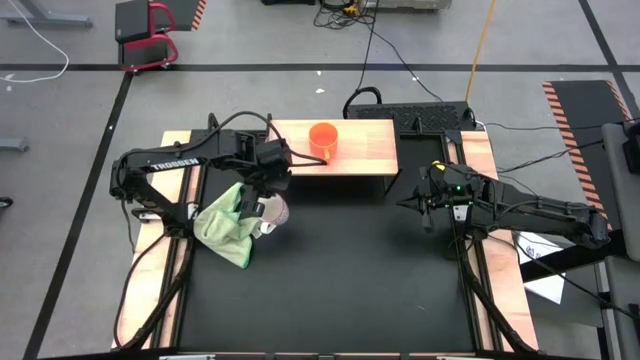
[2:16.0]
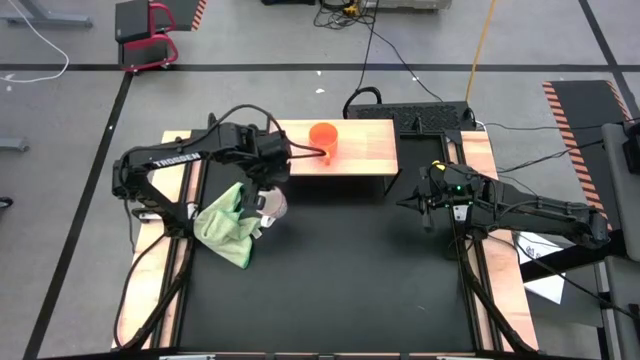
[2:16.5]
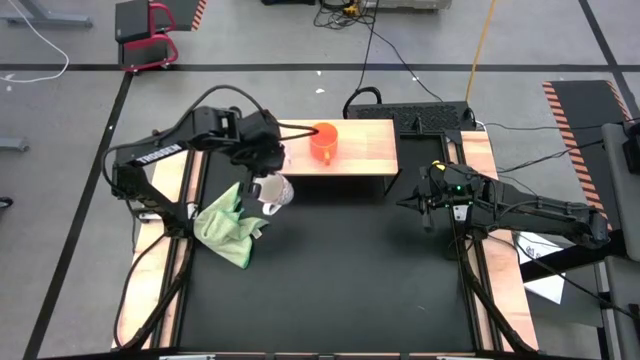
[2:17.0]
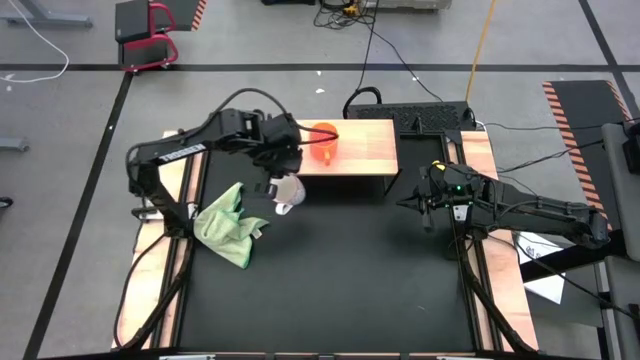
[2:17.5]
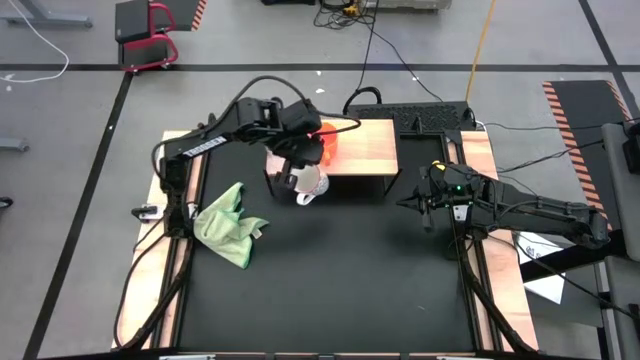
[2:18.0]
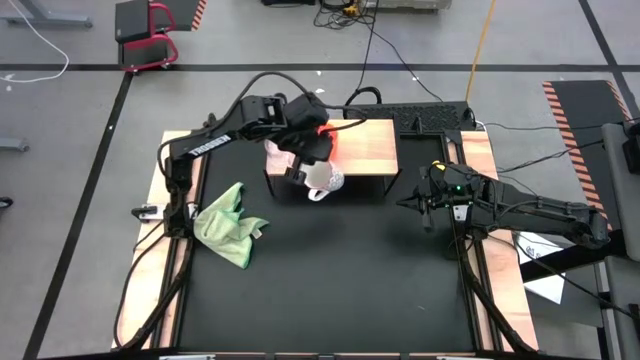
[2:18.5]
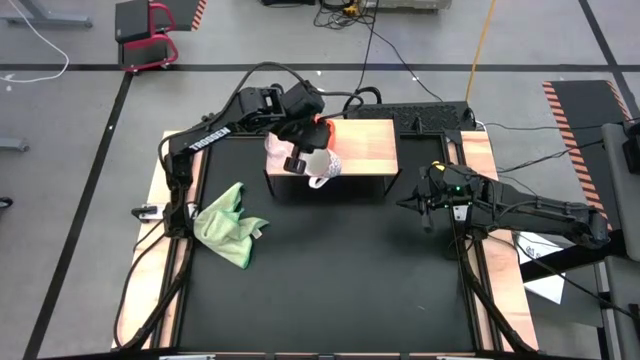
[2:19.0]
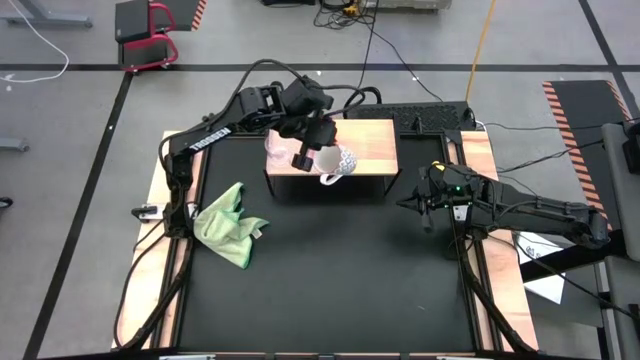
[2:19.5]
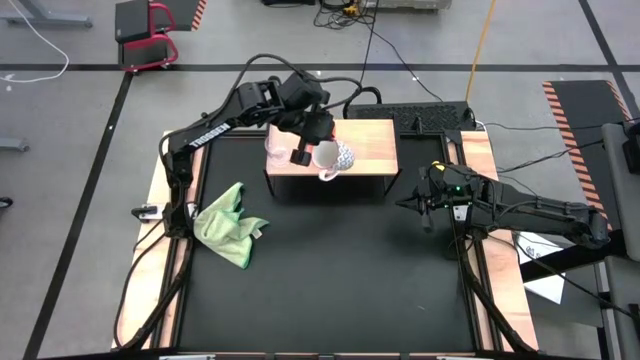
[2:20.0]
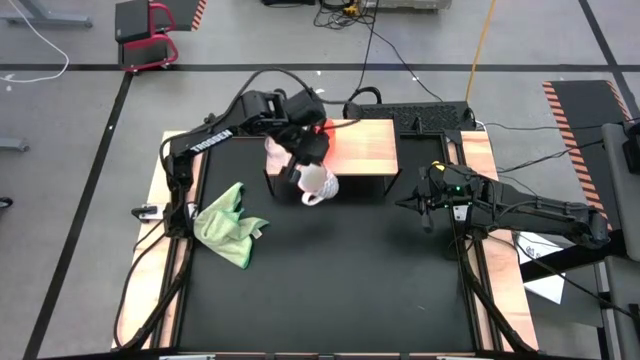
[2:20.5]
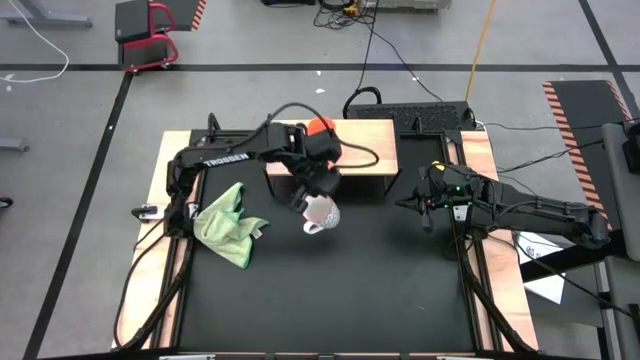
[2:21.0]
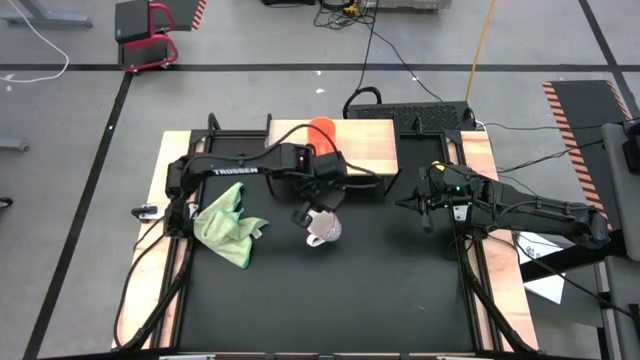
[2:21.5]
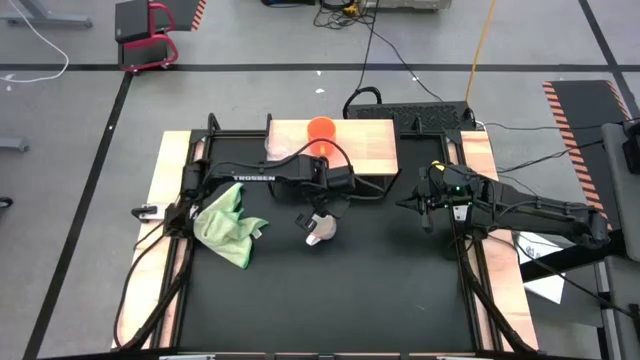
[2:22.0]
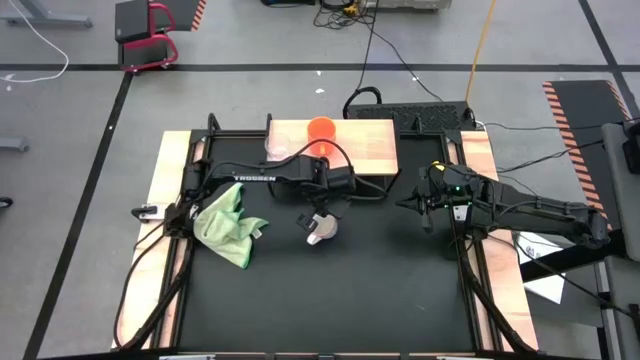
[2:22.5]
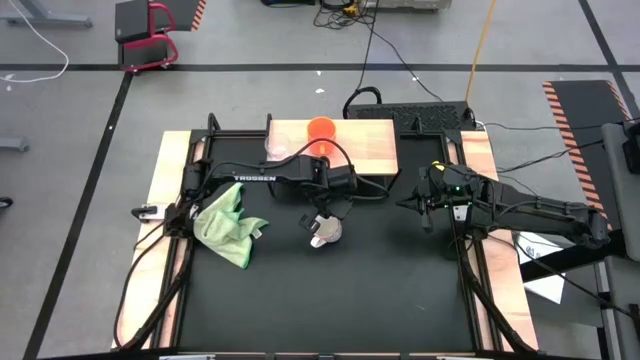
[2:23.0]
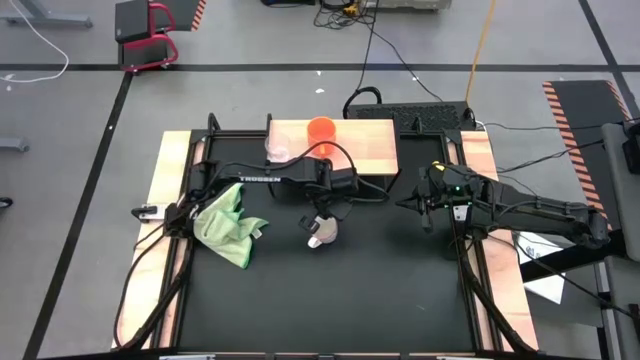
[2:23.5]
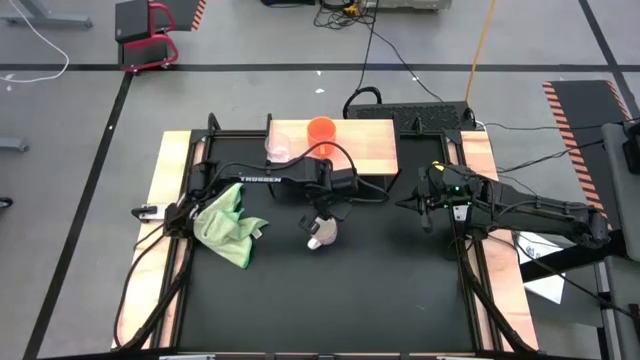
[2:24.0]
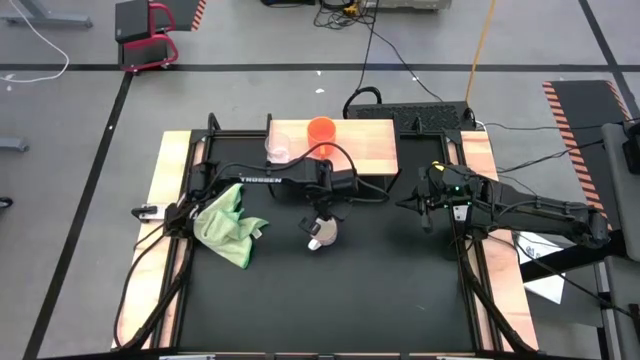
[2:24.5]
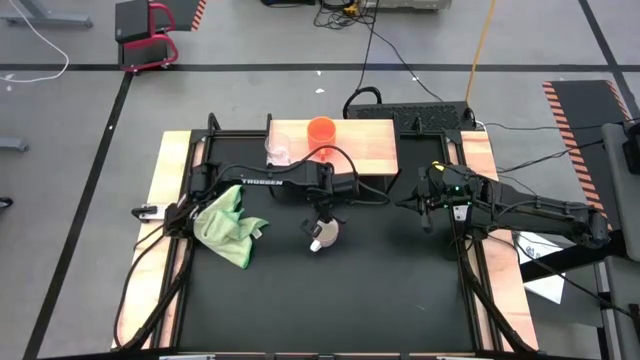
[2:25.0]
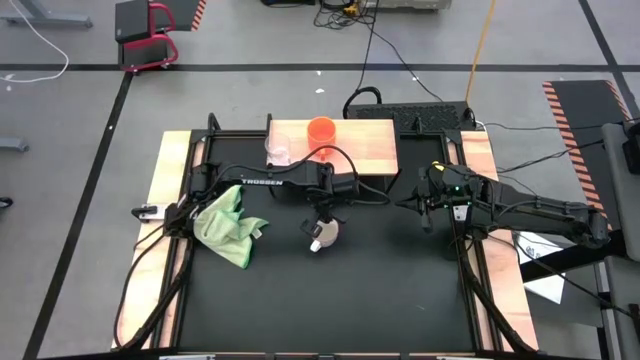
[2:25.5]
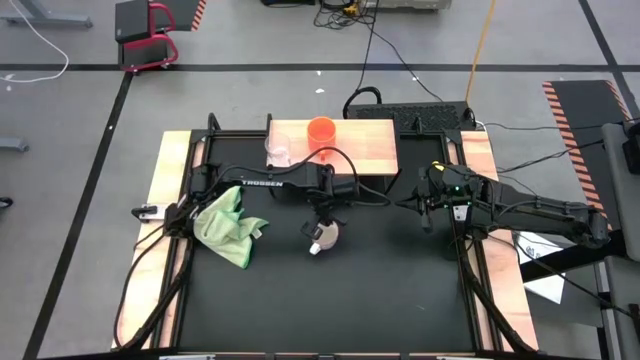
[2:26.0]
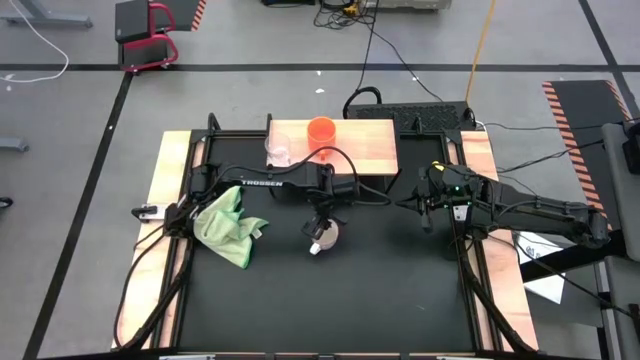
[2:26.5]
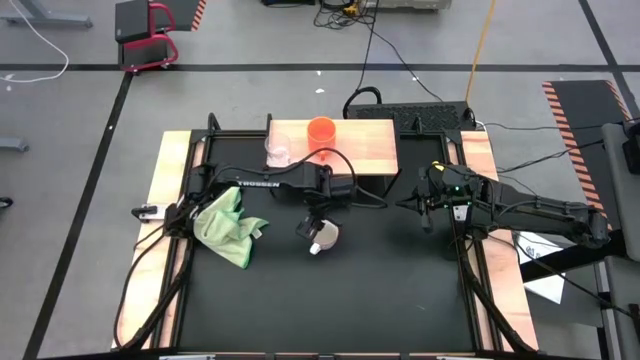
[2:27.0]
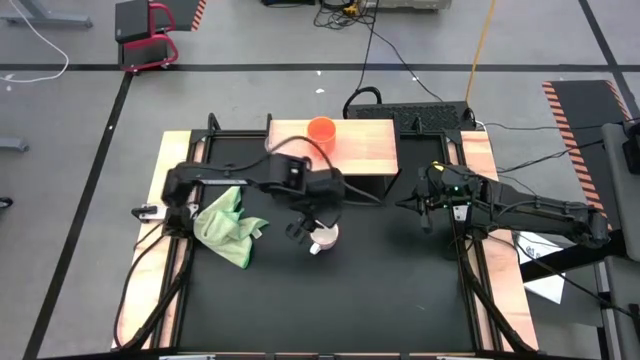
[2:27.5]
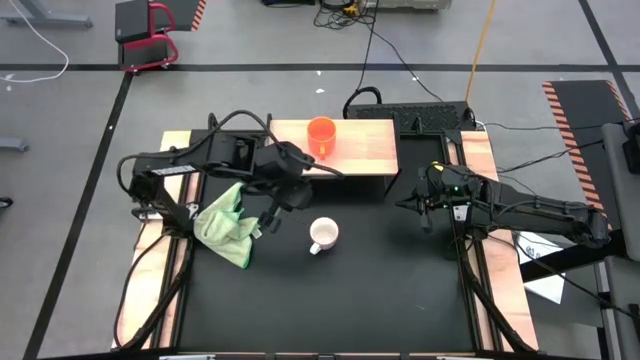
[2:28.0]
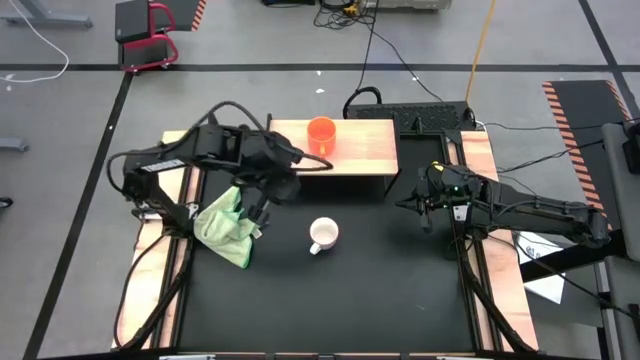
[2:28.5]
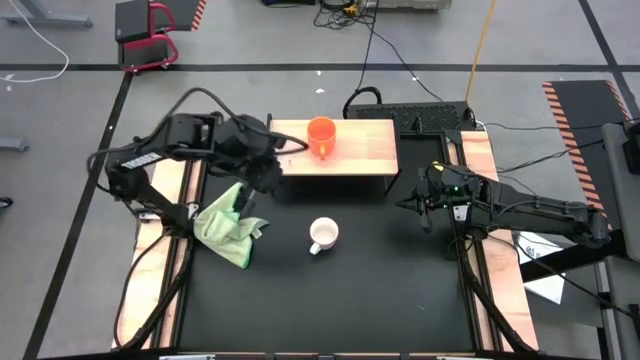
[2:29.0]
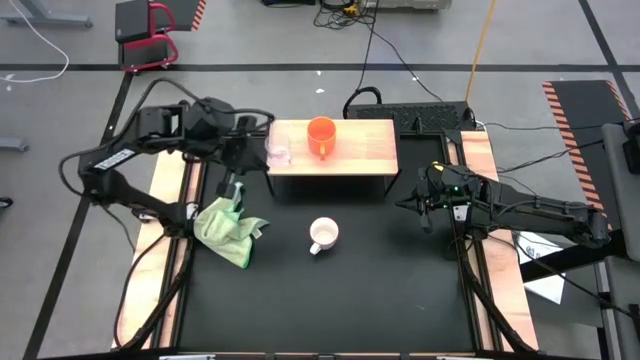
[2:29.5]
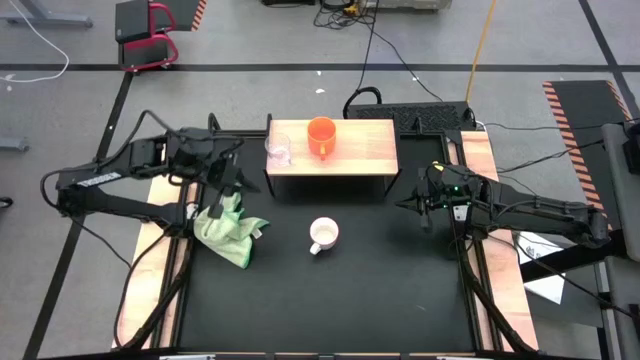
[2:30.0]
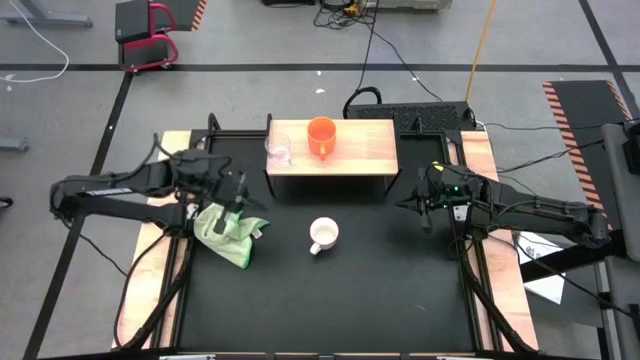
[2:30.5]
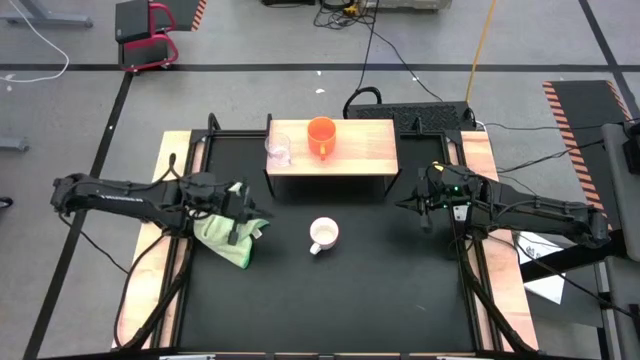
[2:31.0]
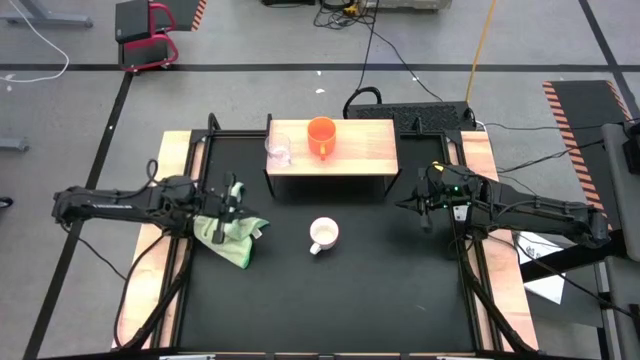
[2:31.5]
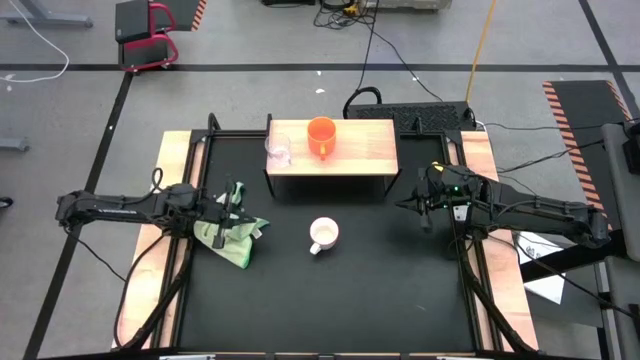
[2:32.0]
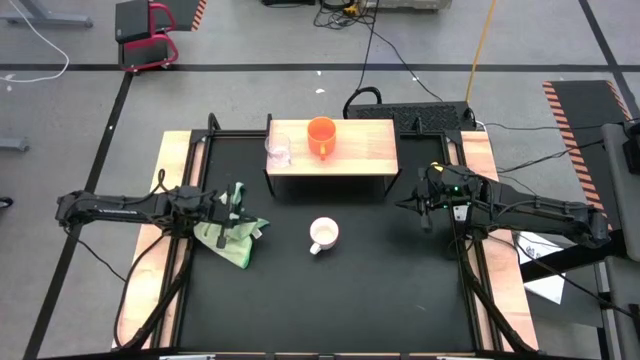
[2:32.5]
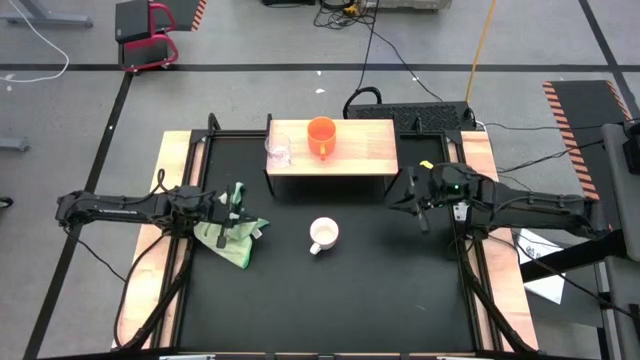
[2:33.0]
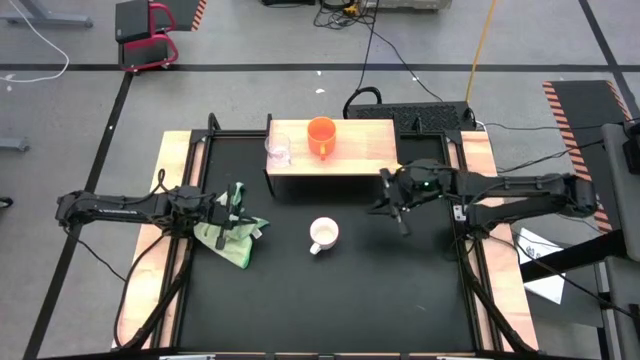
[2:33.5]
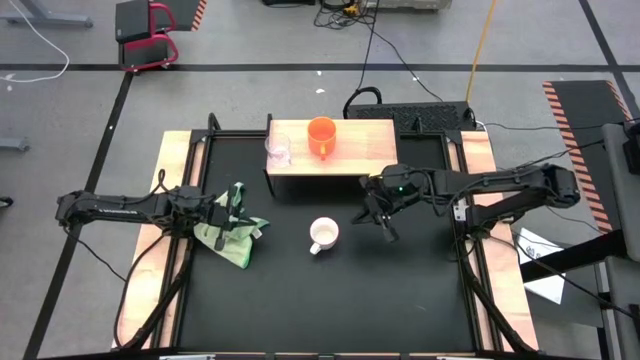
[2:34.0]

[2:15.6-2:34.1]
Task: Stack small to large cups/mugs on shelf
Put the white patterned mug on the shelf

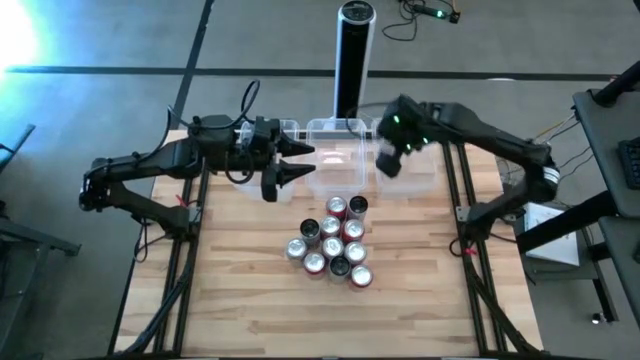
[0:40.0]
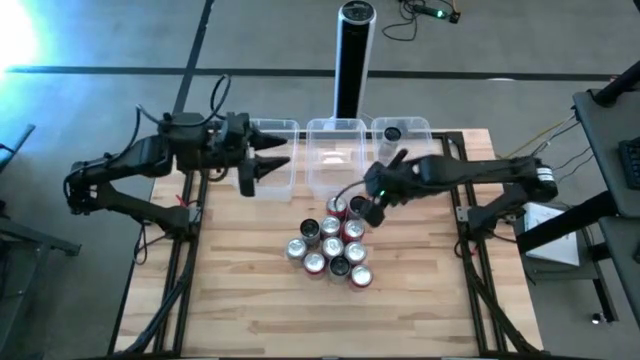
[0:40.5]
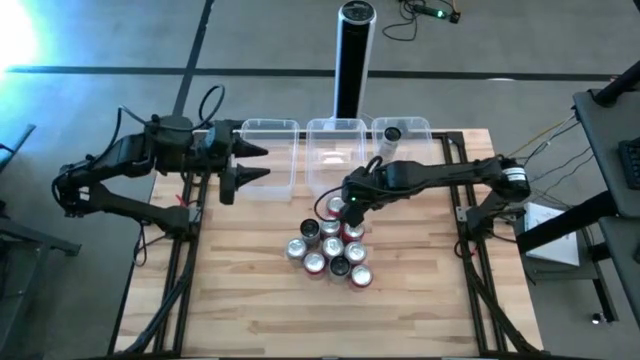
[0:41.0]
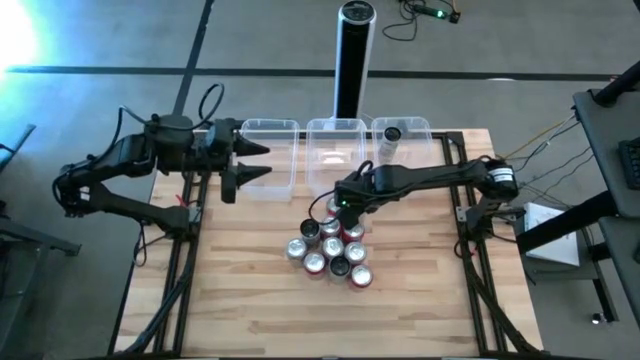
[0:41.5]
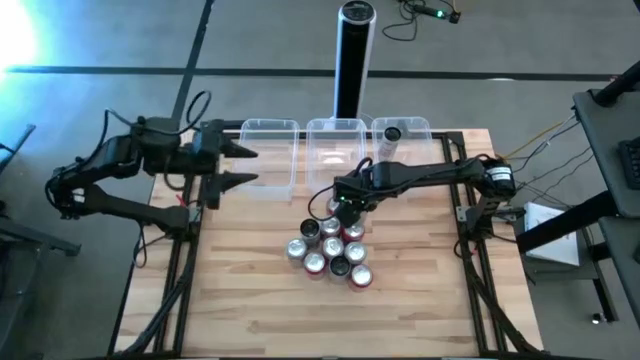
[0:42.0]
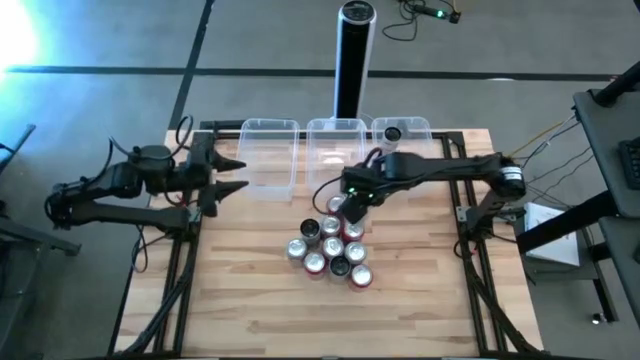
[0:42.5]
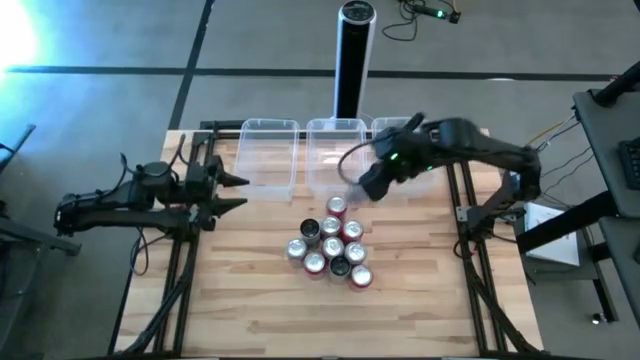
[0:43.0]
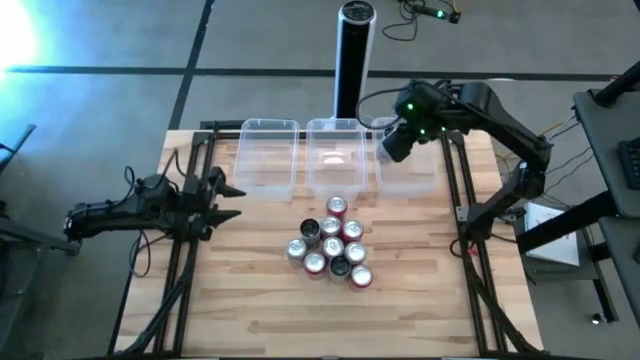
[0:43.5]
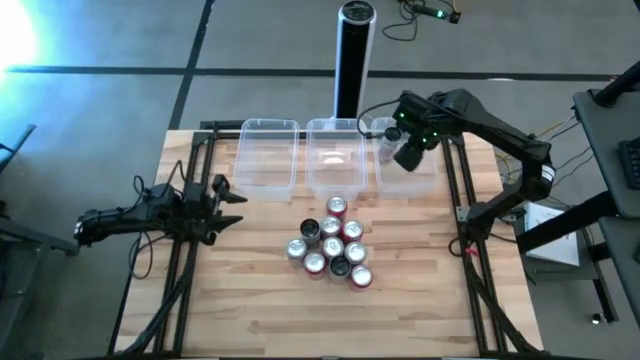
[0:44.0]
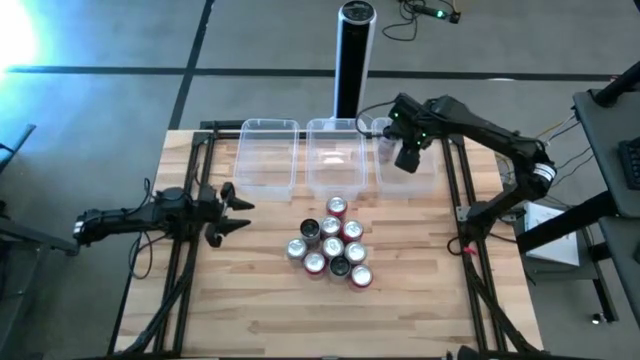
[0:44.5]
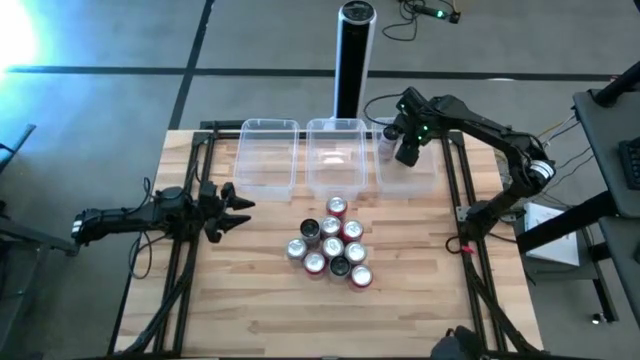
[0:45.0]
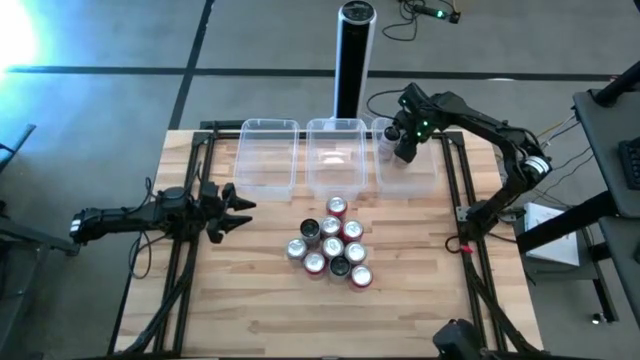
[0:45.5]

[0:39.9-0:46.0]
Task: Sort soda cans
Put the white-pink soda can into the right white bin
